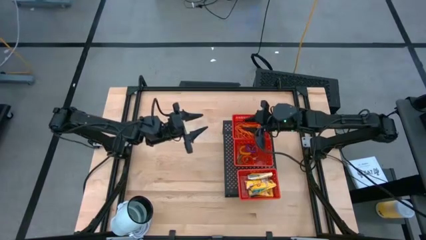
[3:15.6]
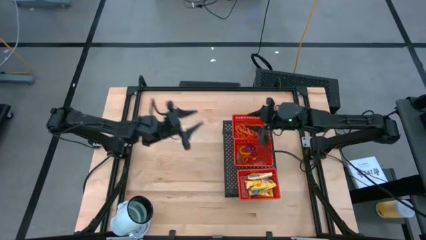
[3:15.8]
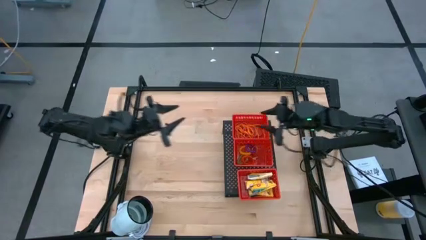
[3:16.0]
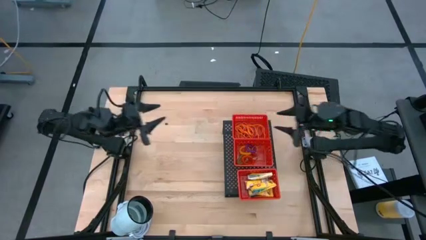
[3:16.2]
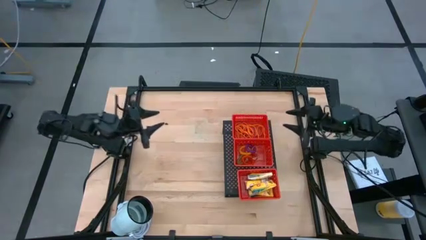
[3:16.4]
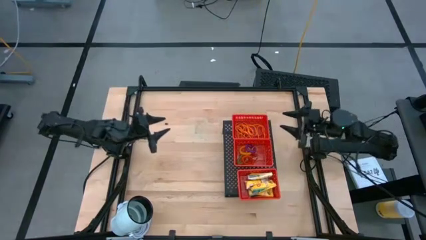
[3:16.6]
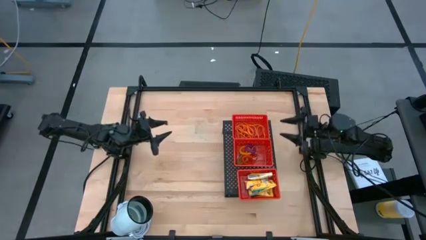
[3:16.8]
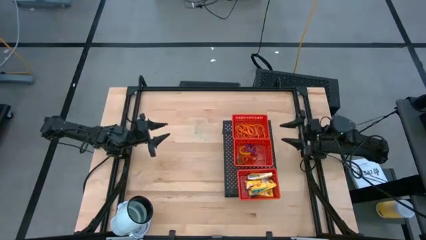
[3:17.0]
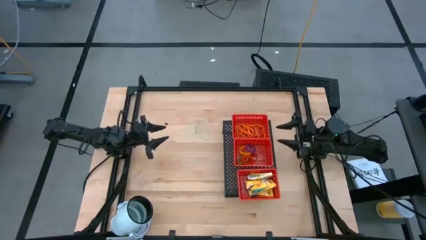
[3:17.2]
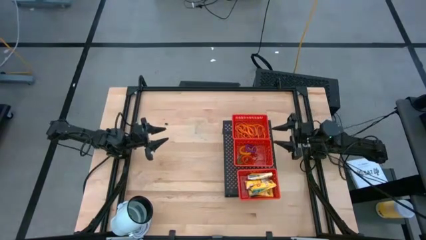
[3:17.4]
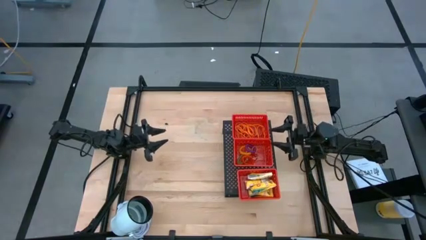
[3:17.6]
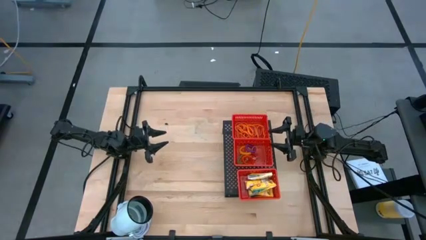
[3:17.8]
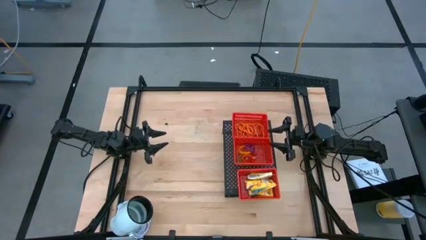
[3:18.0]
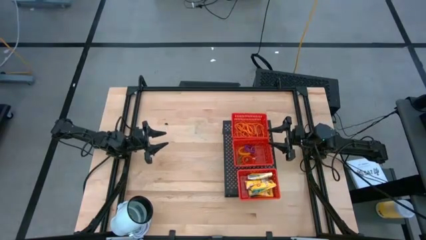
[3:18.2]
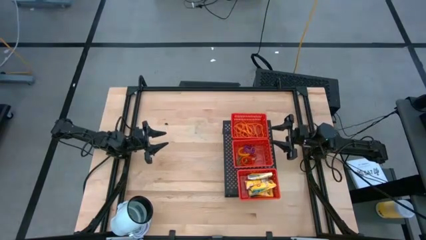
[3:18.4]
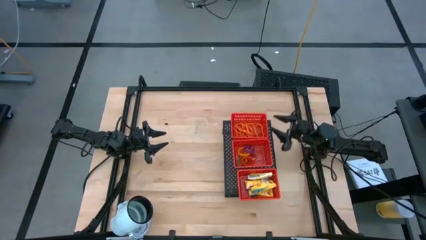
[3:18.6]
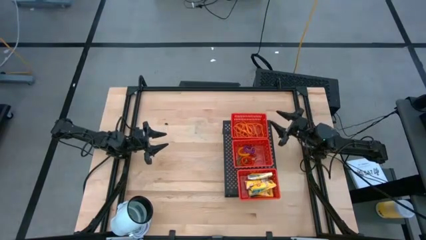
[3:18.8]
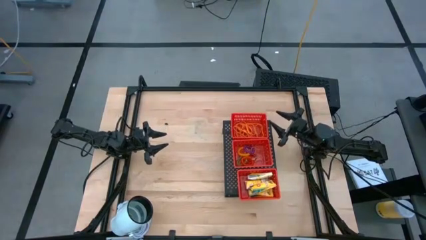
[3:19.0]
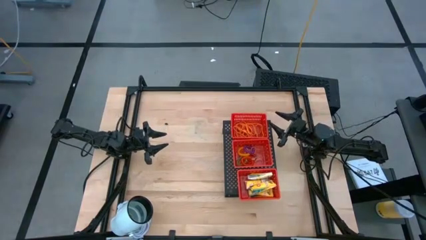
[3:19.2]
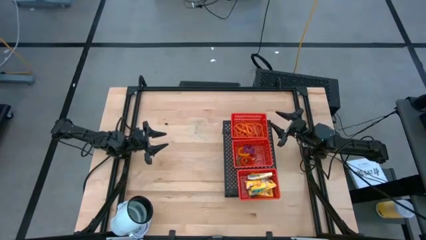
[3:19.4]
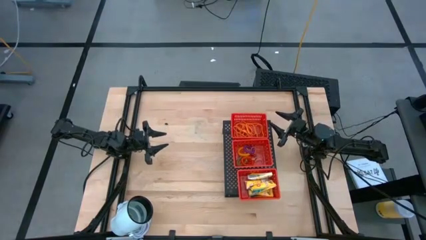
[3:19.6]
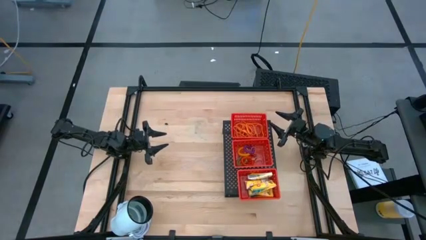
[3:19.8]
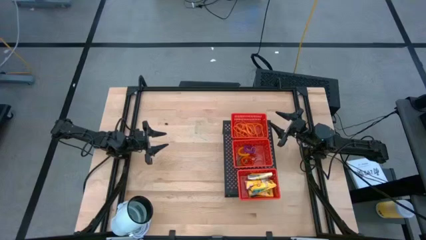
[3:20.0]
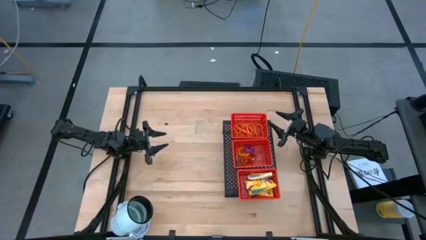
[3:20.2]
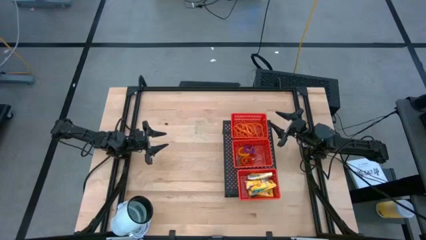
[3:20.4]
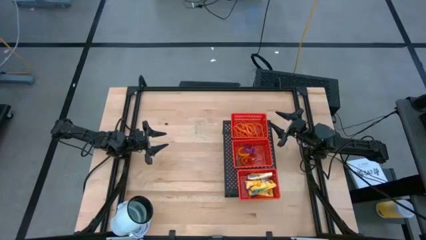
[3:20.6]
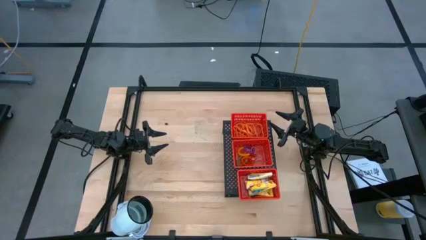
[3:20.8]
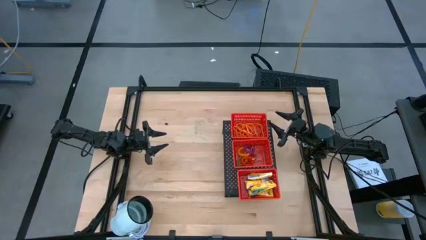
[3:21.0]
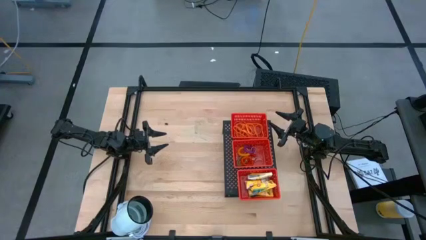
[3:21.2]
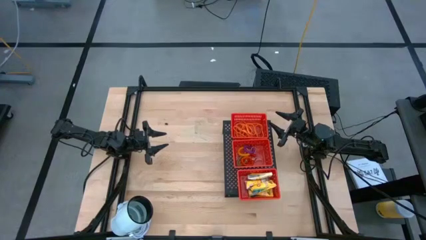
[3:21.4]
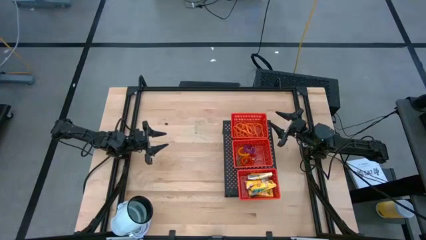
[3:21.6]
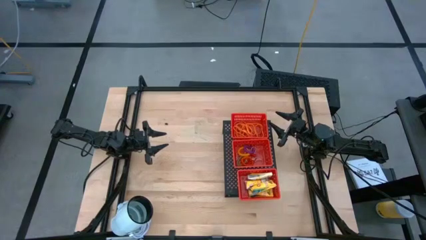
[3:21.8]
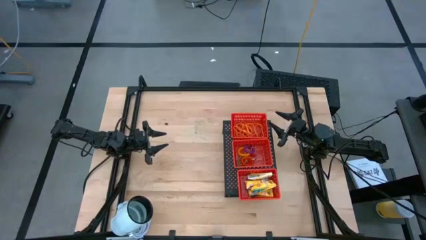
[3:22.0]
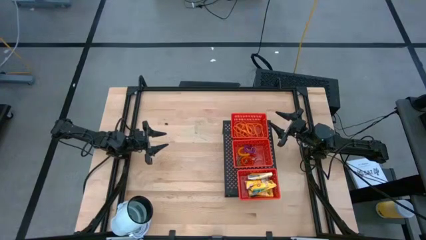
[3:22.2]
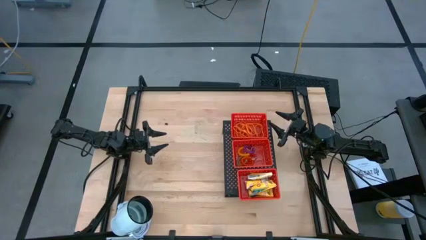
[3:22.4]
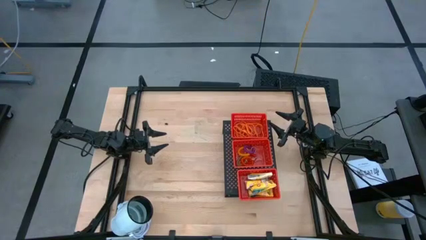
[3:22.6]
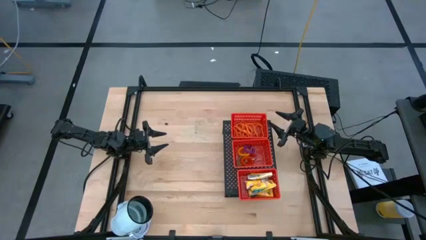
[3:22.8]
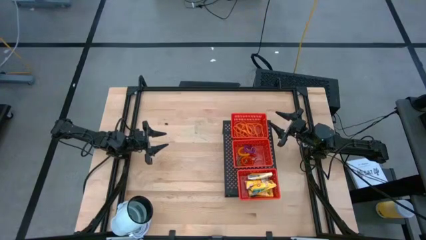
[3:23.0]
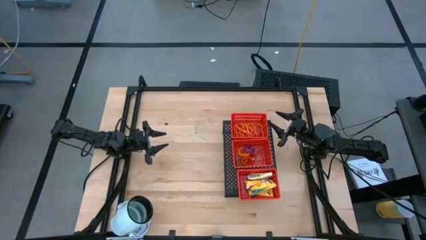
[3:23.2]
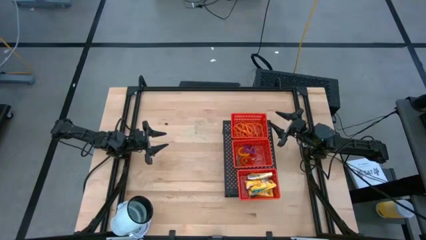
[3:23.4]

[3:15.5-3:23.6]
Task: Pick & Place Office Desk Supplies
Return to Home Position

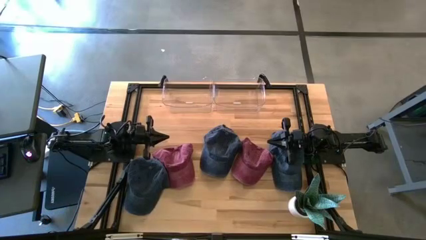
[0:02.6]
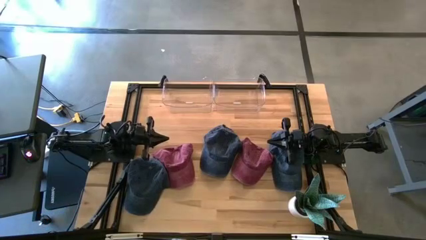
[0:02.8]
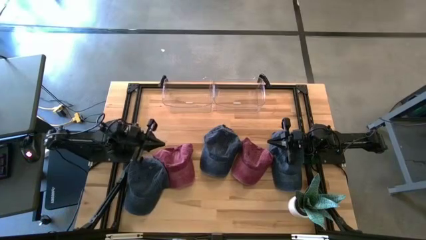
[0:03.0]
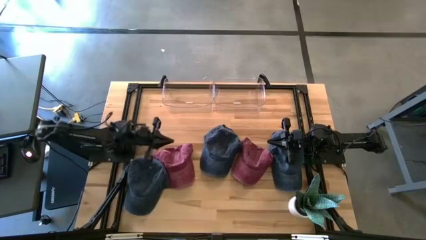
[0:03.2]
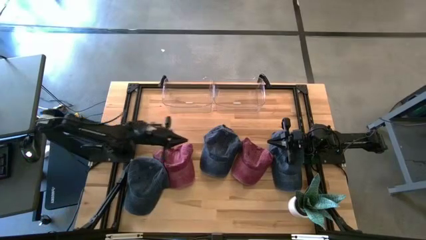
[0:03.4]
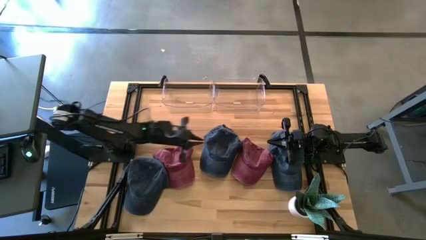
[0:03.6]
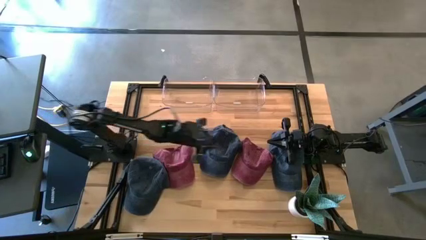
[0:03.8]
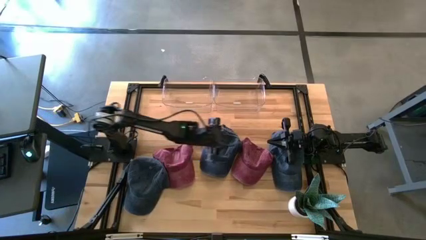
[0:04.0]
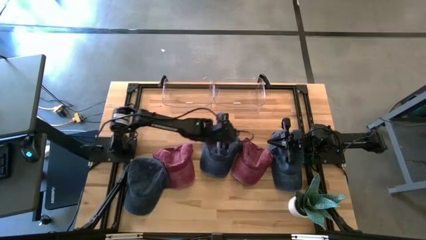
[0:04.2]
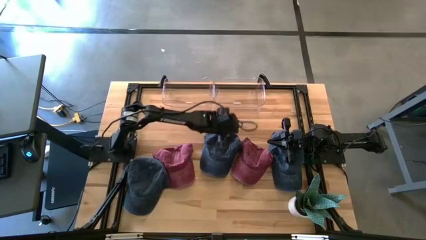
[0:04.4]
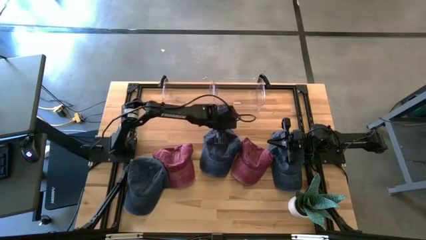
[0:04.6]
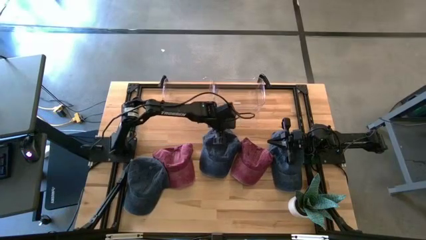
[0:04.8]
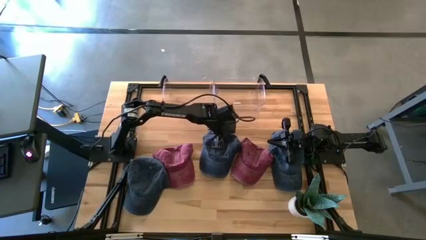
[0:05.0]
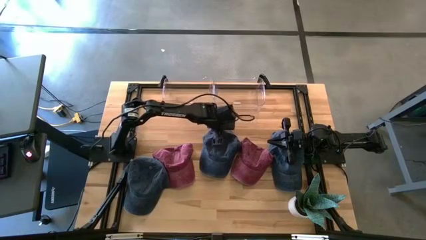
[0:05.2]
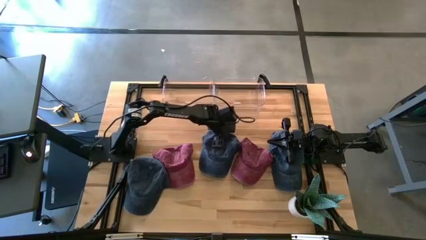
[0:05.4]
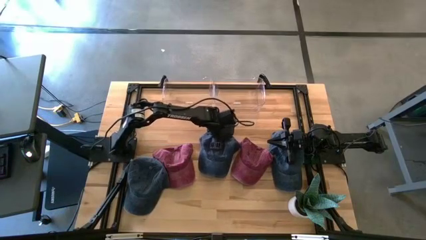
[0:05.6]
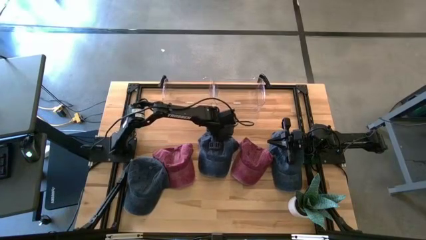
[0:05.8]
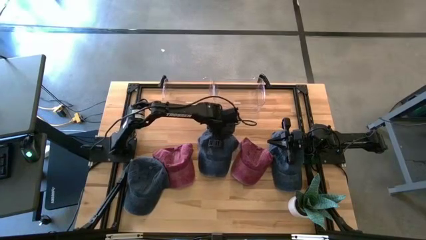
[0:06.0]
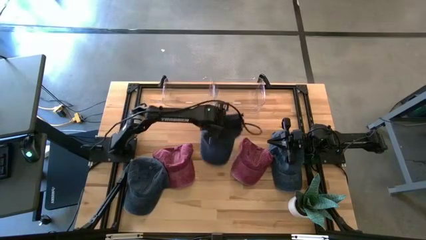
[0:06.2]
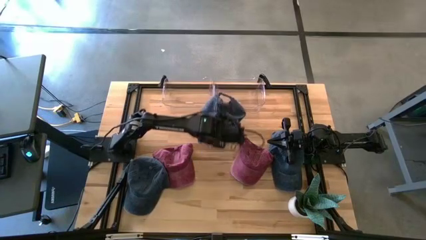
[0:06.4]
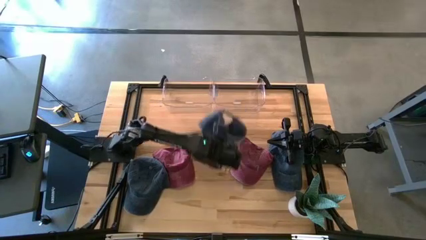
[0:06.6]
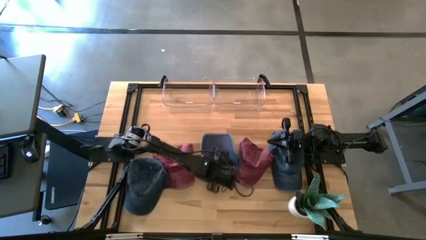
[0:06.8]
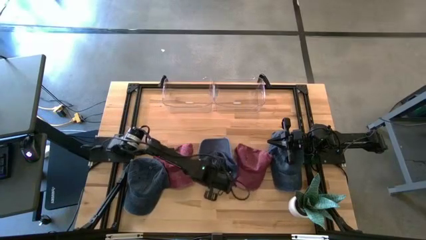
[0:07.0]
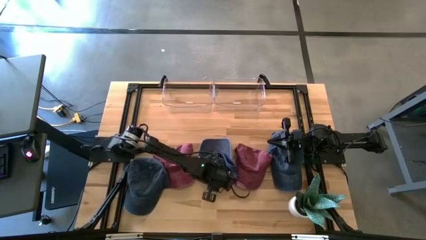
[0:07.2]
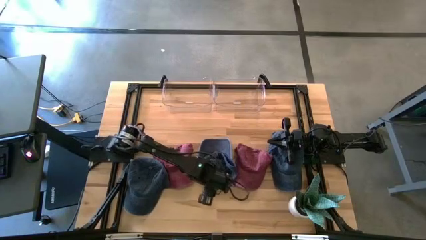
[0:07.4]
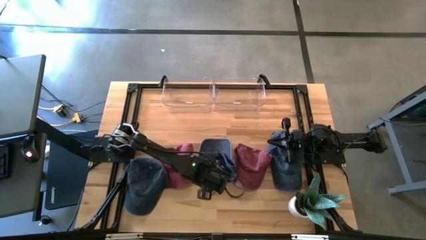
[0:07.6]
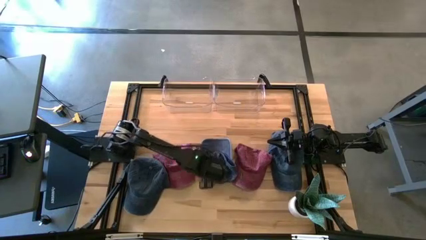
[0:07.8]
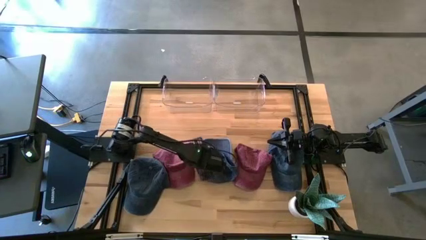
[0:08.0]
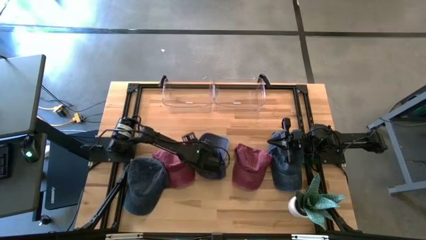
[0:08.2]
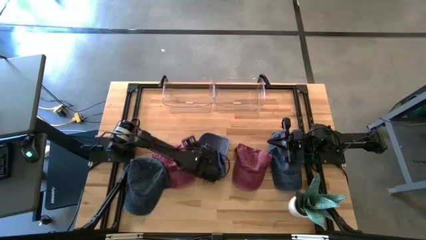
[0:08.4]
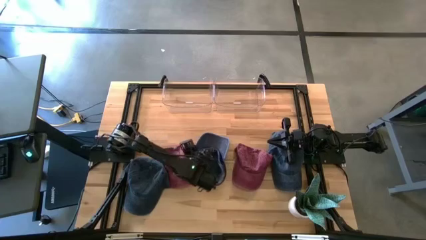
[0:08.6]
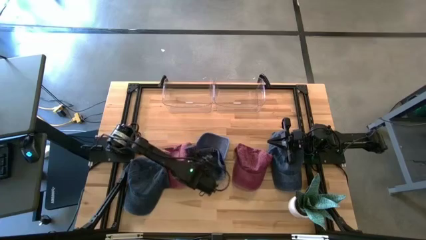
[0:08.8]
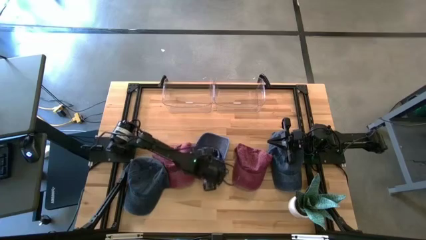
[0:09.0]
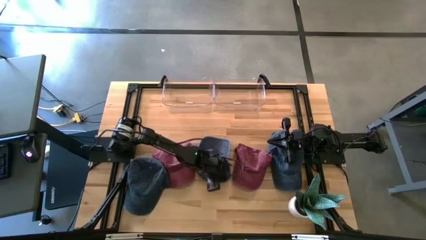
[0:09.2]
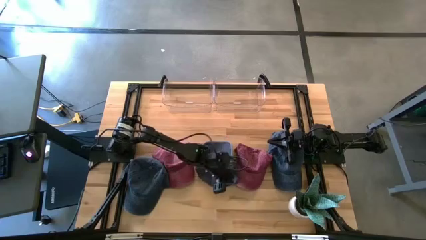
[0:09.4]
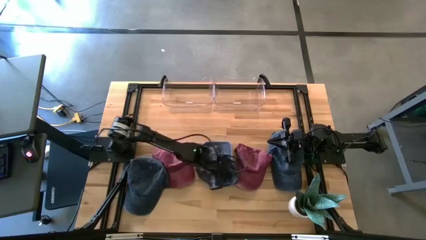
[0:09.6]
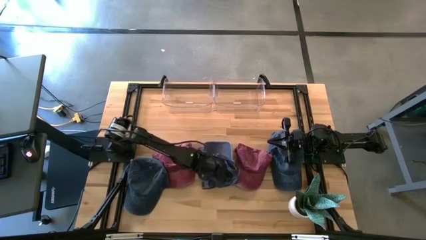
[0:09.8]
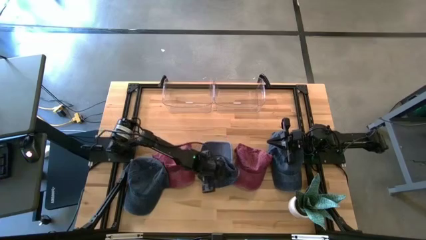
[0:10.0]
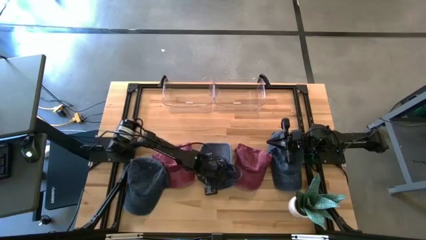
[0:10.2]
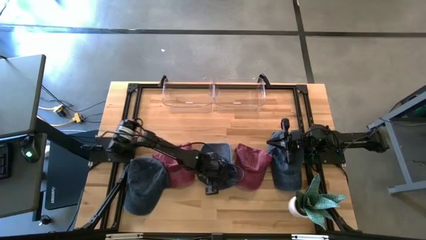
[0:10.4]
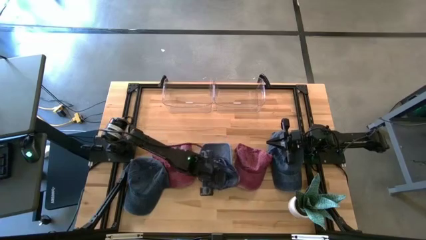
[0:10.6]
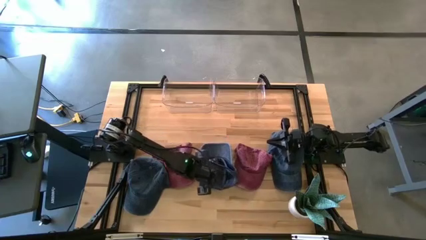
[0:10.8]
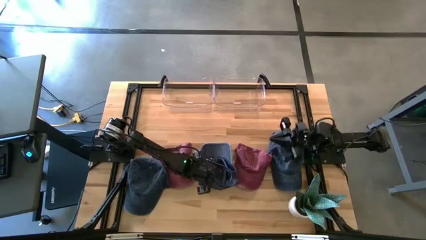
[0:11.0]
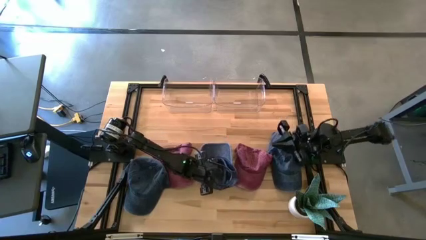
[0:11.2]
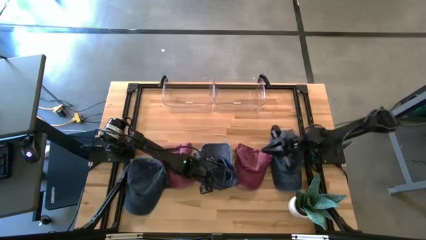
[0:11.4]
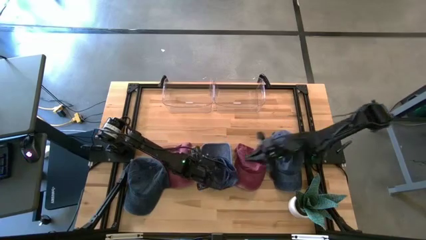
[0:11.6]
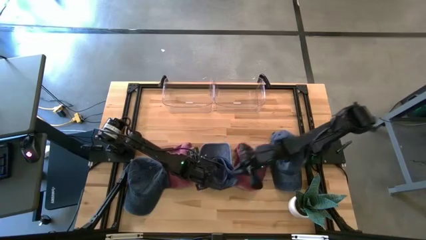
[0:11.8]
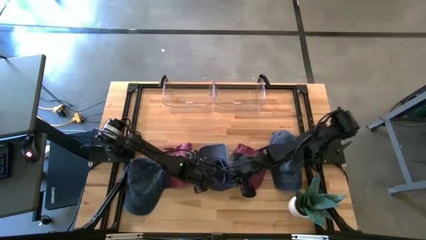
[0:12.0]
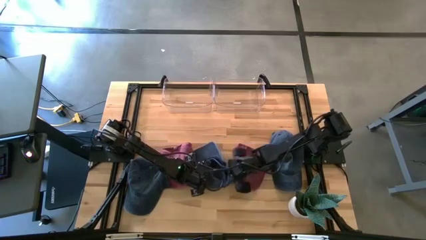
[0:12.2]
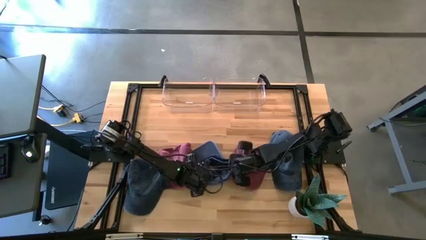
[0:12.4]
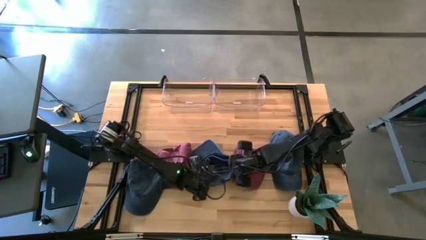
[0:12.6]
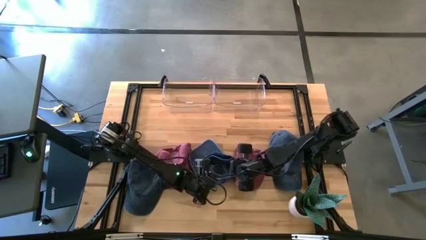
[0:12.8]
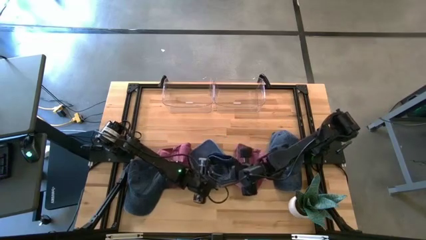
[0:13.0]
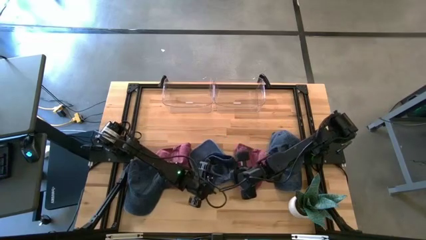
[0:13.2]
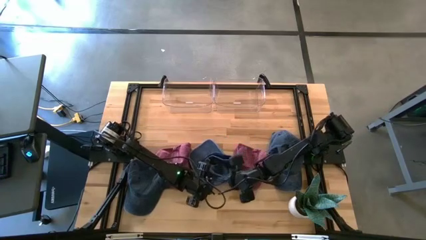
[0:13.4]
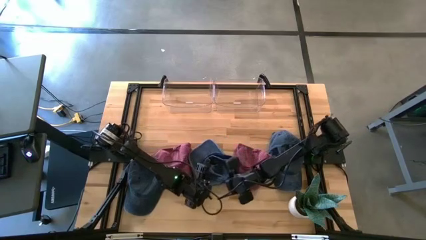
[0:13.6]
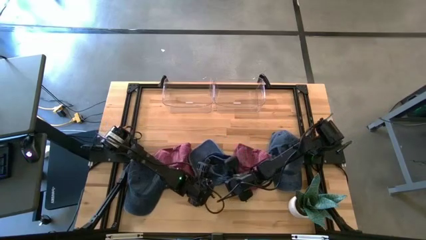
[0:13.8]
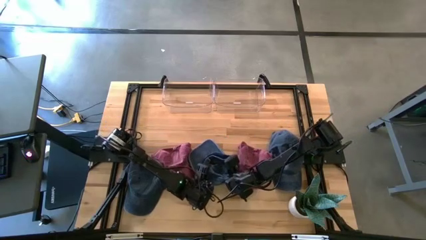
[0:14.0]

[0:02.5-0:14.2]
Task: Pick & Place hat
Put the middle blue cap into the right transparent bin
